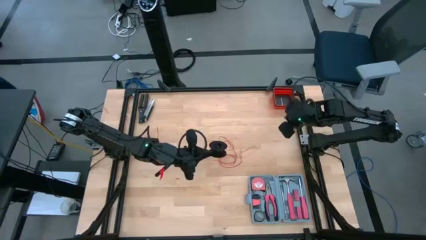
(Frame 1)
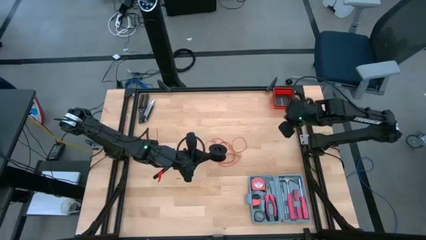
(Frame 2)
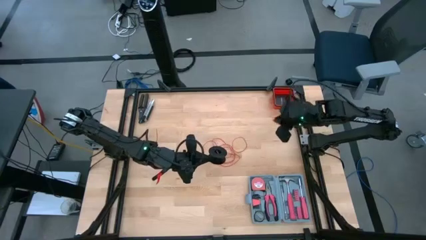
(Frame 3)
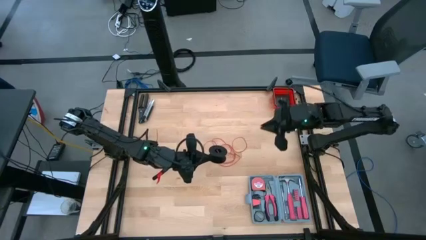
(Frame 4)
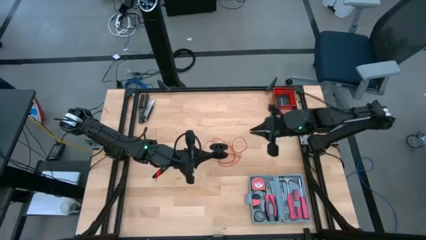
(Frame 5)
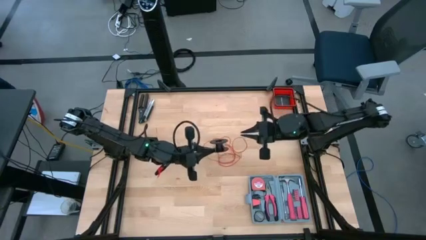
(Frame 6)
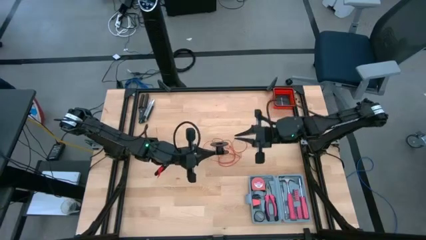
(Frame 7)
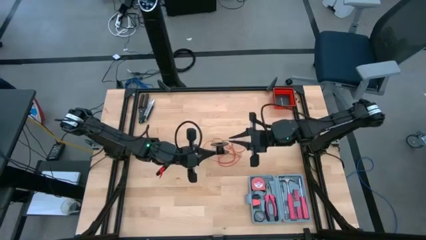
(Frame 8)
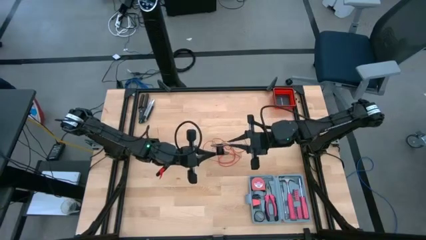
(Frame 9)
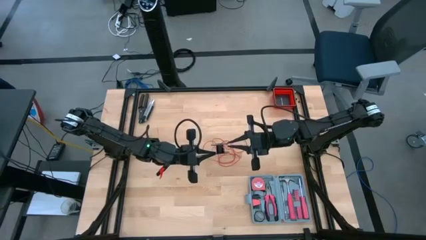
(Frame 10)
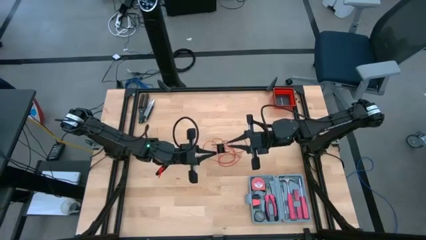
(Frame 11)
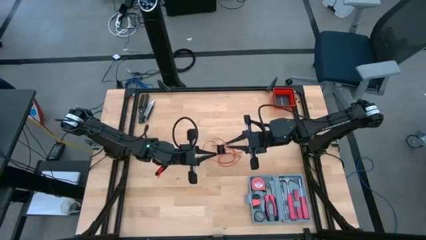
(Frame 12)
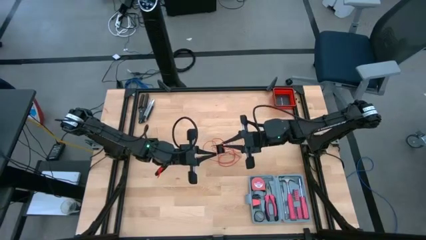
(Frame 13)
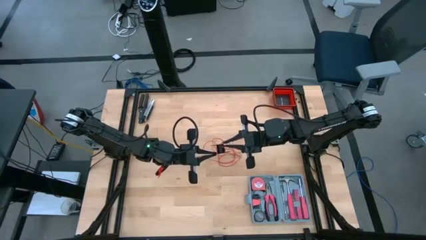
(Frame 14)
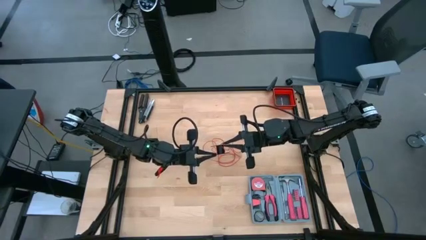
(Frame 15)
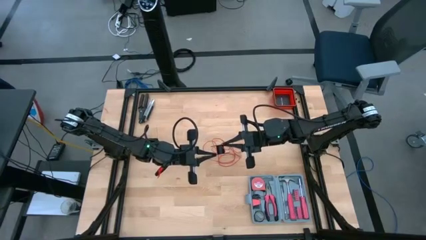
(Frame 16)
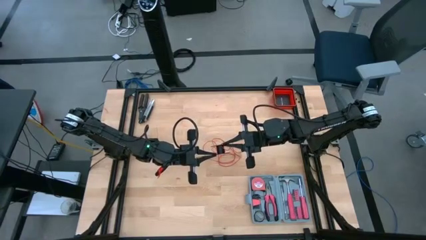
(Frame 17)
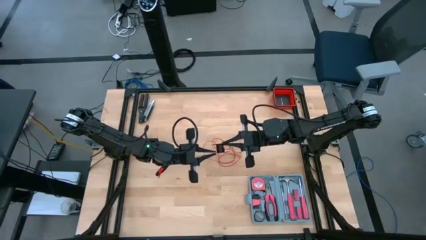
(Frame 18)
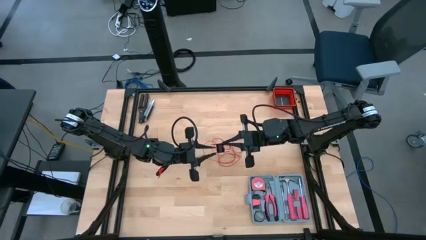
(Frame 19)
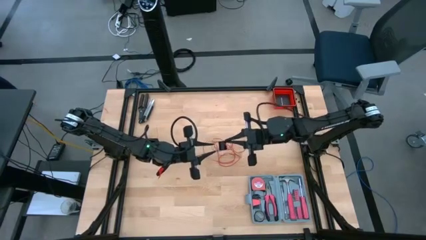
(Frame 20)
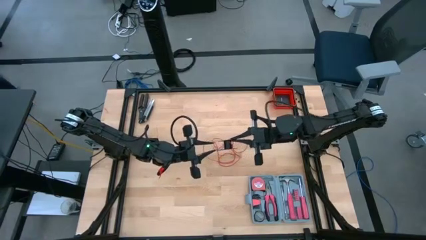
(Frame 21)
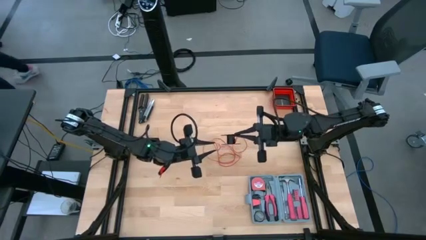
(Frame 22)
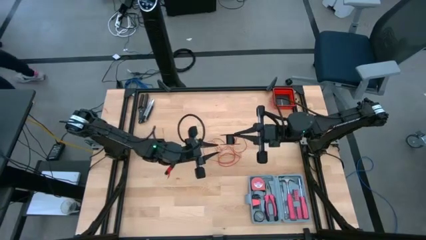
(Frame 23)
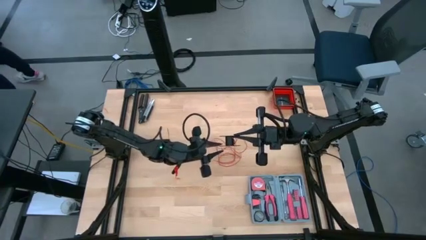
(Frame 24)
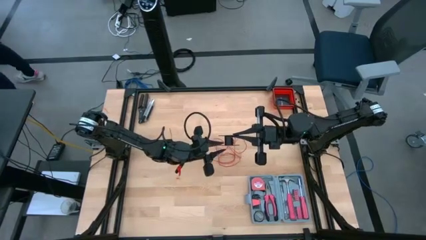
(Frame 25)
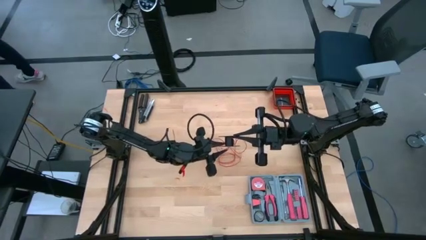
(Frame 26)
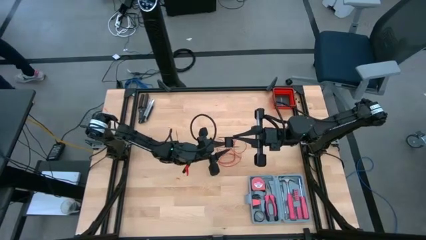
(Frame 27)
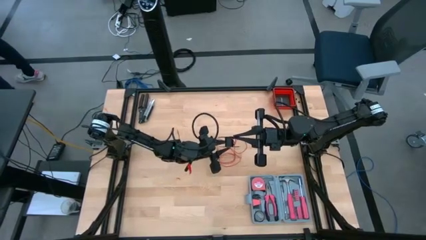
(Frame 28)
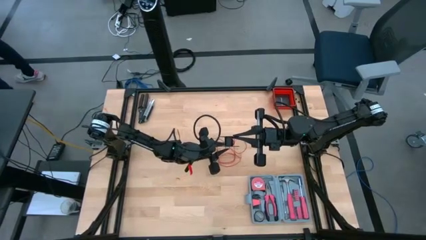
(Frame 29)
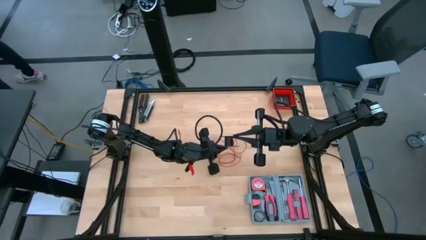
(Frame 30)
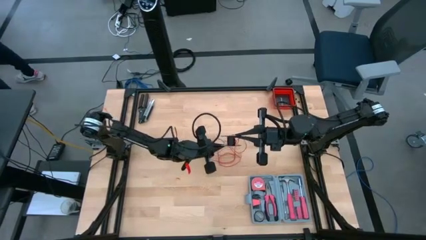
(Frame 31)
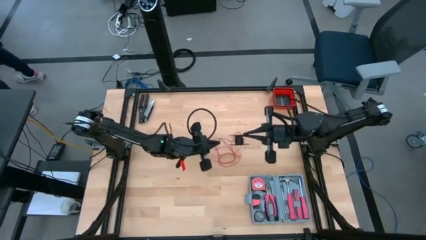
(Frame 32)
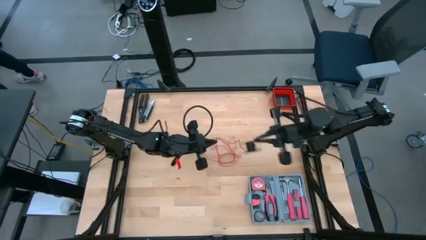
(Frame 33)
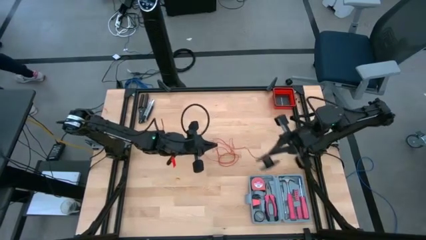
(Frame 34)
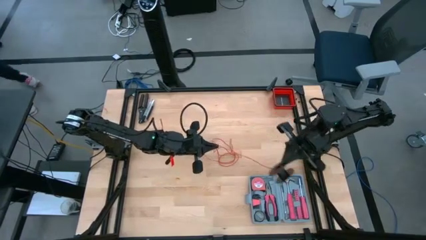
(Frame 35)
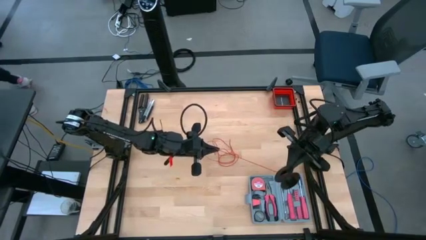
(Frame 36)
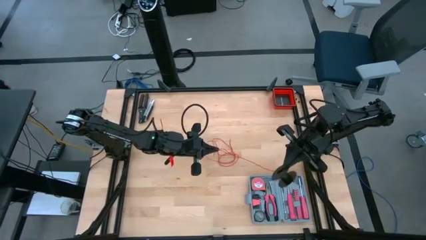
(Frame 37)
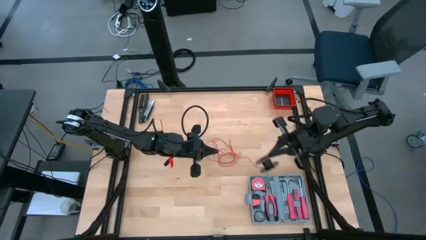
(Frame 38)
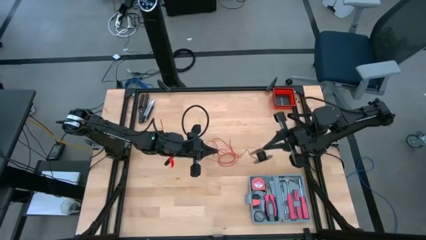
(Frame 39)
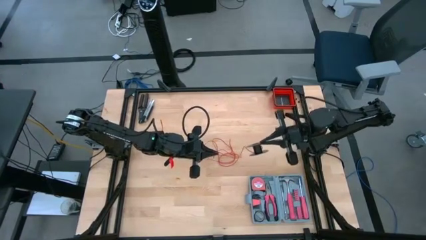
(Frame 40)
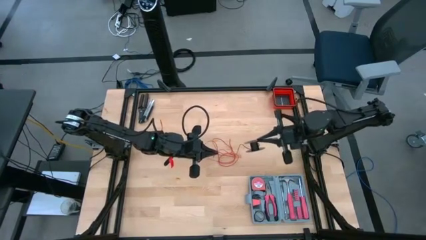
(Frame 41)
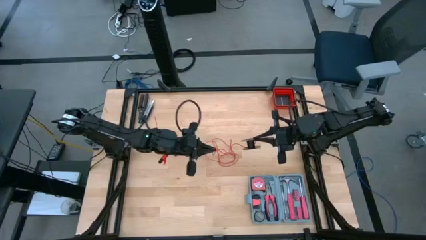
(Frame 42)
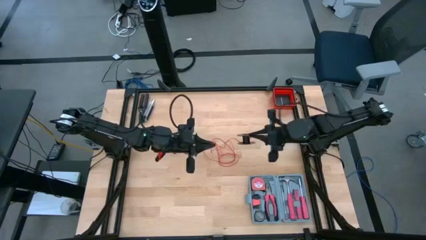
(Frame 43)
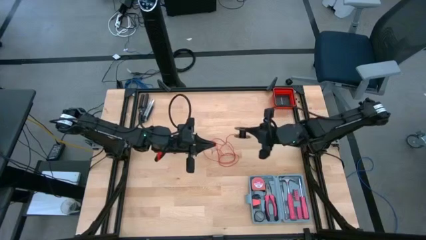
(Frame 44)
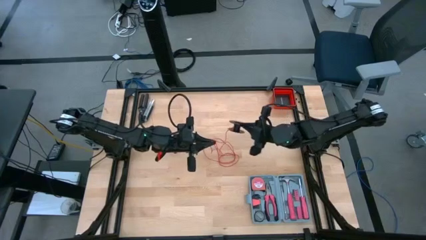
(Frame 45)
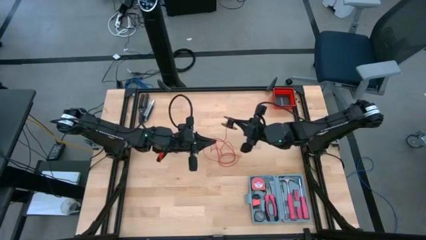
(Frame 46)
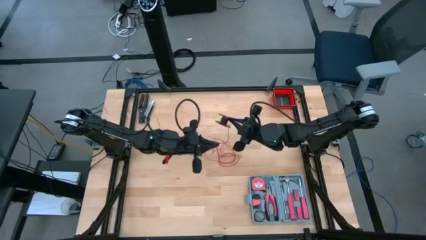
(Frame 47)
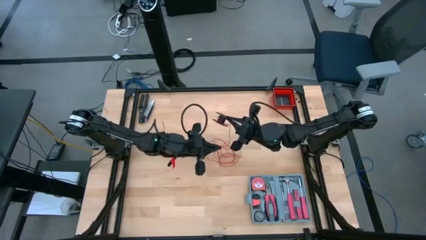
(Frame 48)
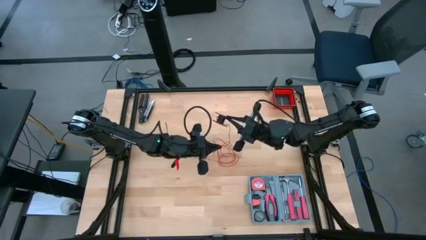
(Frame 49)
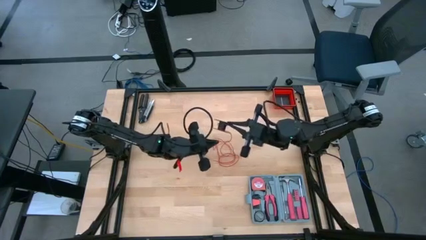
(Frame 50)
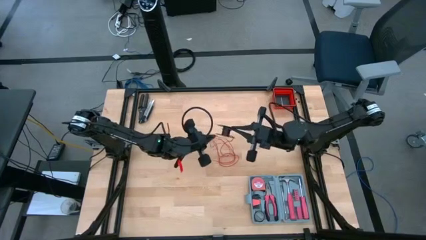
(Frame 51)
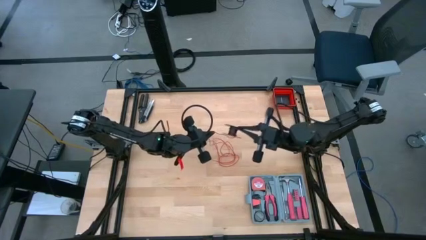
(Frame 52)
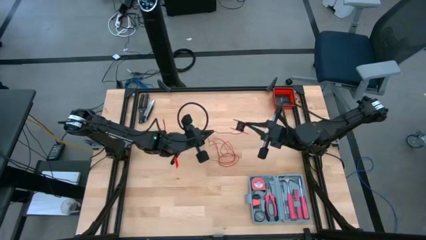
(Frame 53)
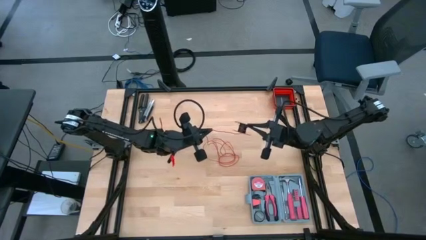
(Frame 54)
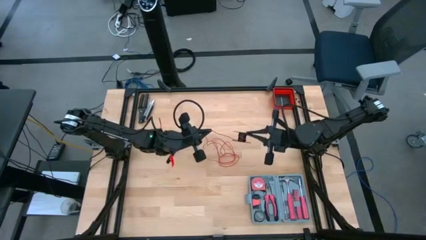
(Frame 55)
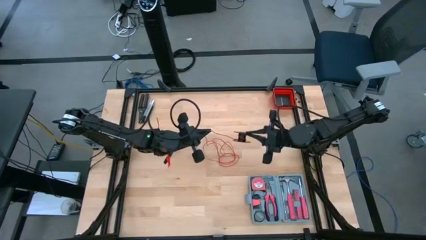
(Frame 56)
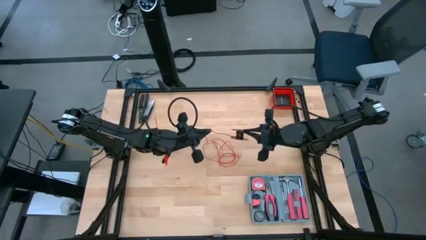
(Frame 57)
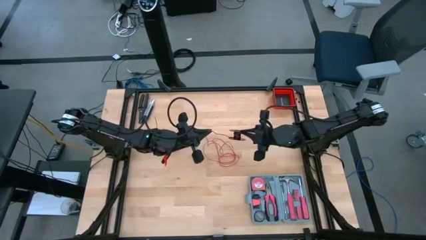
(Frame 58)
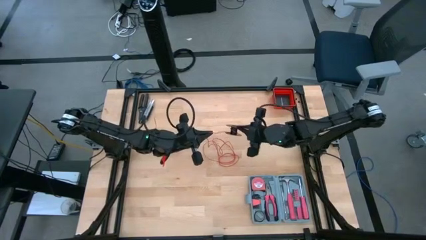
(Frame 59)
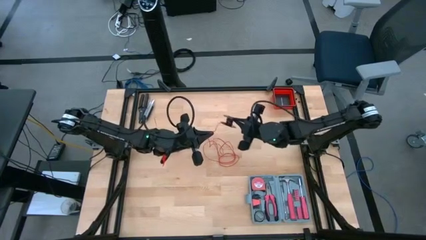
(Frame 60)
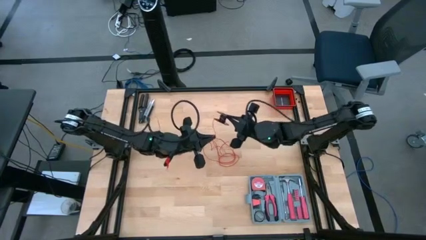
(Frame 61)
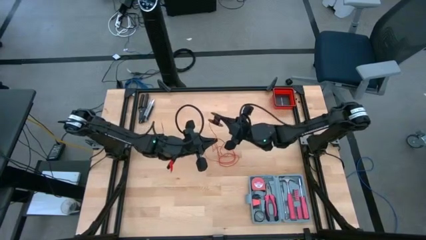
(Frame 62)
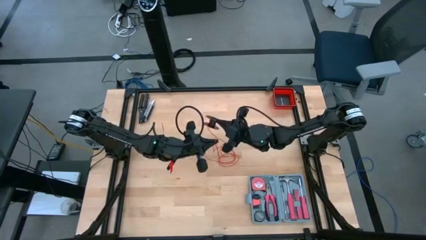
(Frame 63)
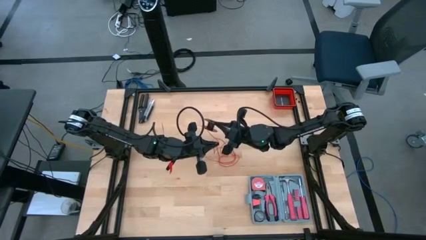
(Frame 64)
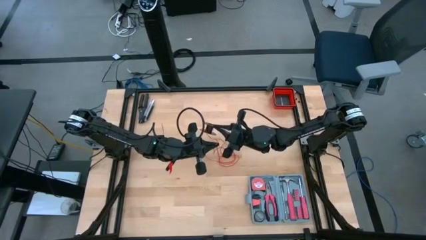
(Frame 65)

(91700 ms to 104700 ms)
Task: Coil cords
Coil the wire

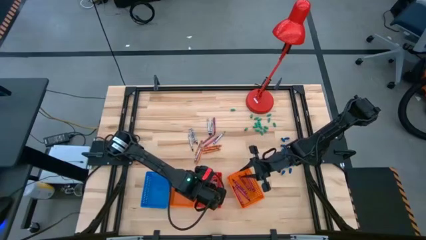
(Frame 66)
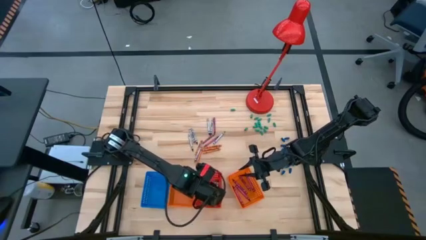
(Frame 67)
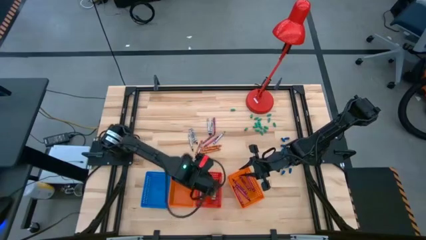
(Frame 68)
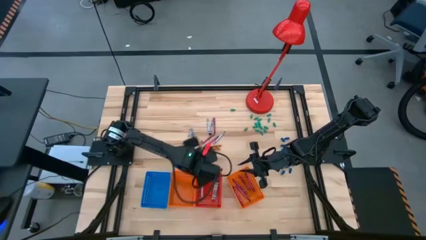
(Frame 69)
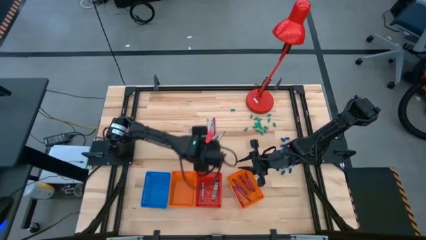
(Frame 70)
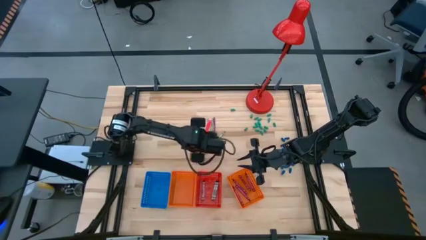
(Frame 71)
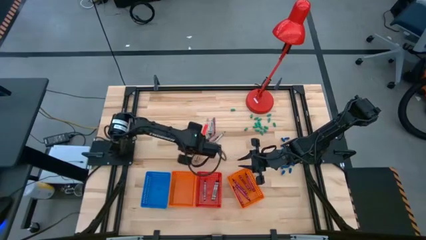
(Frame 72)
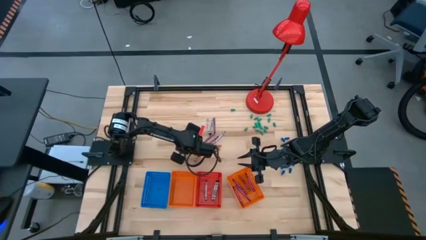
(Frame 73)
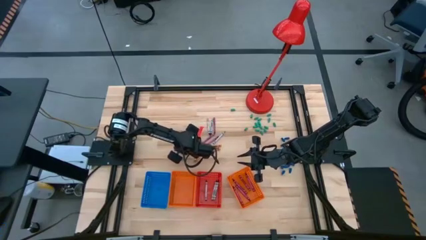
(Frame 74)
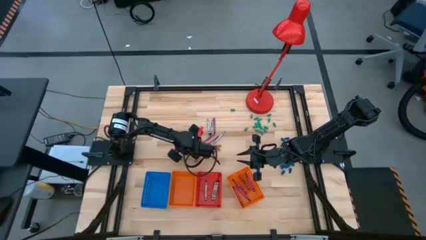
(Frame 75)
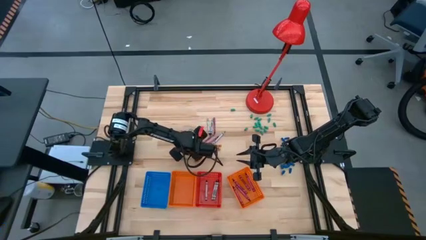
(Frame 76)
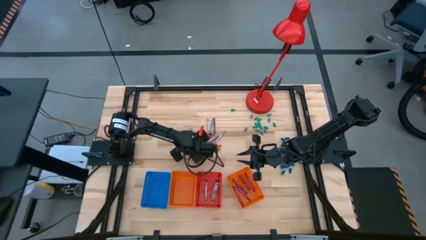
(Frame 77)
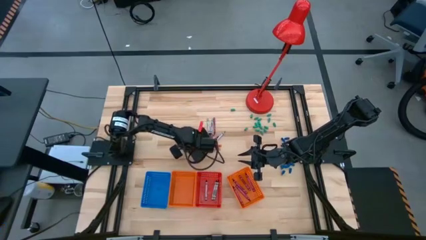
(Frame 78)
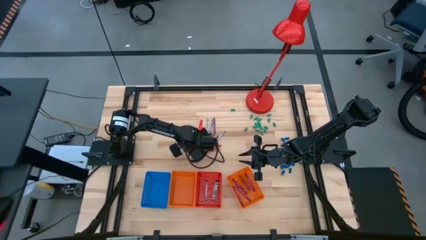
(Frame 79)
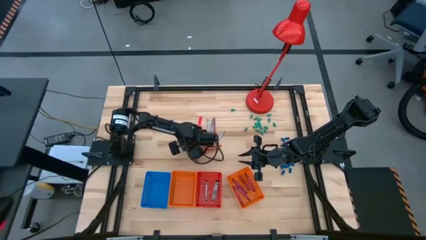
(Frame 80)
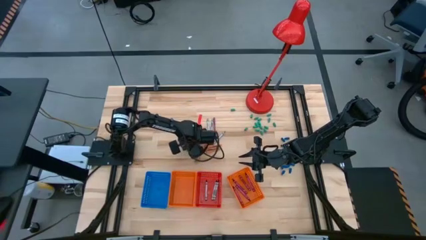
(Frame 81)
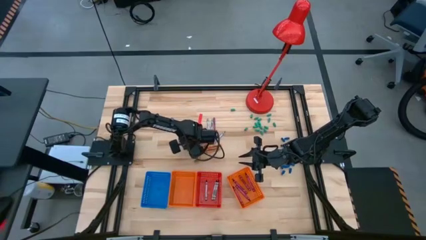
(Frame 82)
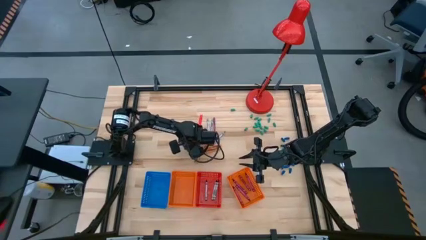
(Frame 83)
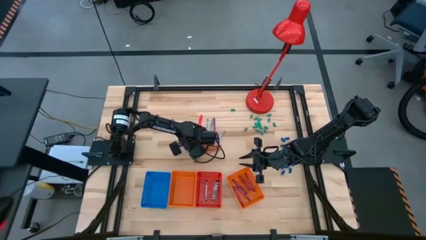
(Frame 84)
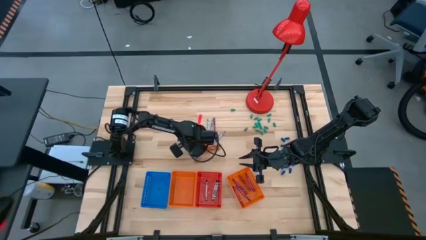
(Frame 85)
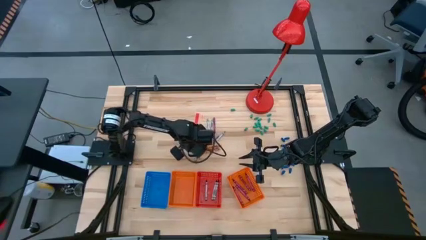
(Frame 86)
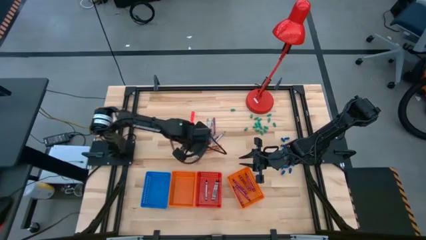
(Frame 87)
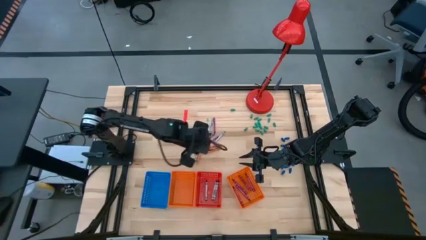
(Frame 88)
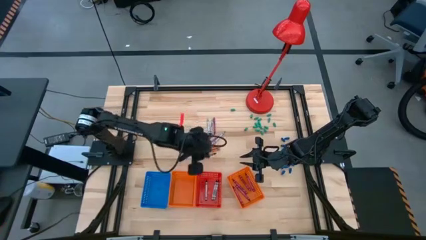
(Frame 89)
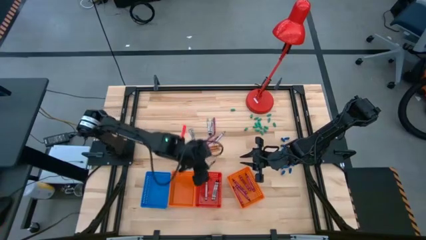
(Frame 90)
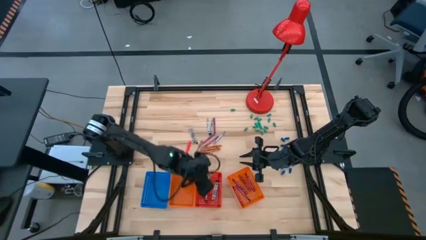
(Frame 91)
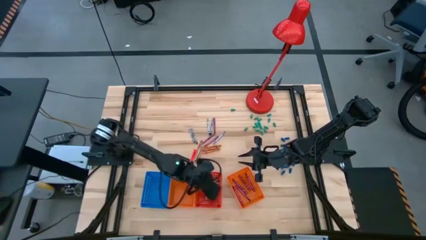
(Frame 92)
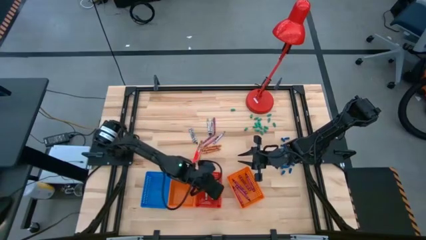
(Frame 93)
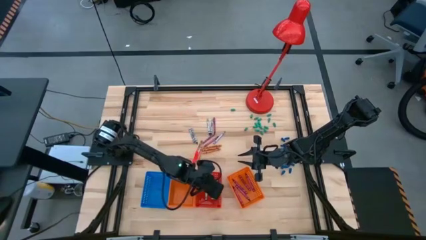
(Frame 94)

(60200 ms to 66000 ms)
Task: Sort crayons
Put the black crayon into the red bin
